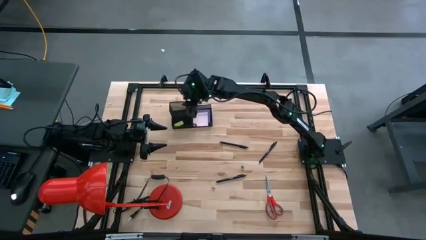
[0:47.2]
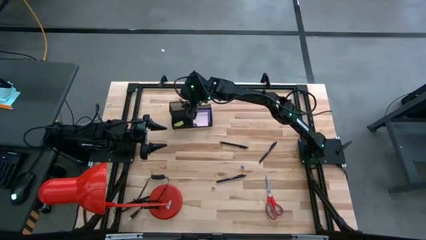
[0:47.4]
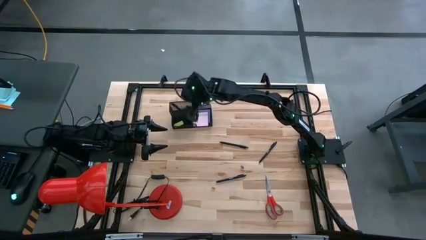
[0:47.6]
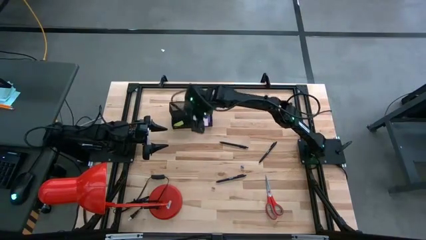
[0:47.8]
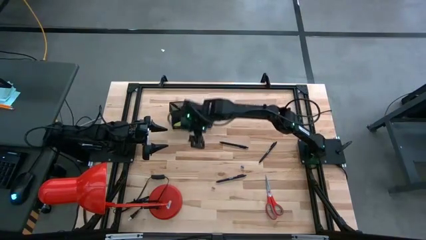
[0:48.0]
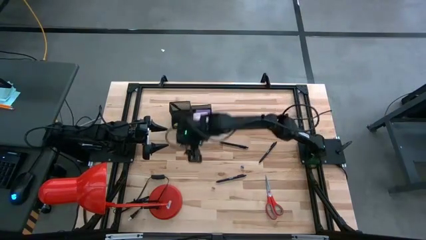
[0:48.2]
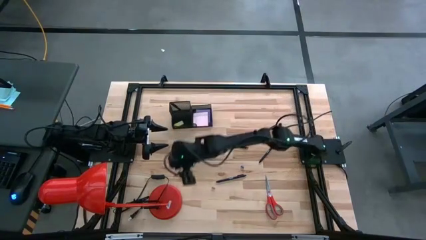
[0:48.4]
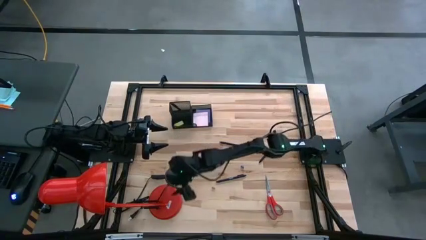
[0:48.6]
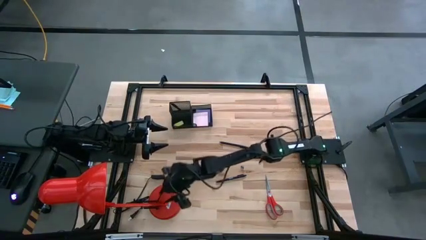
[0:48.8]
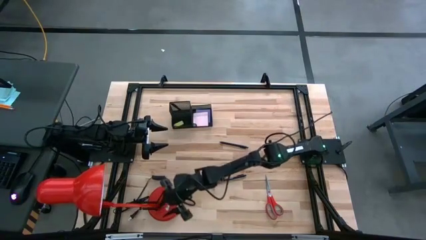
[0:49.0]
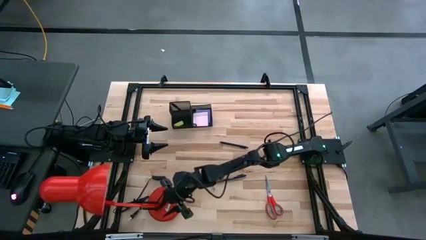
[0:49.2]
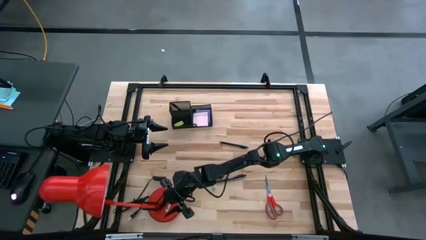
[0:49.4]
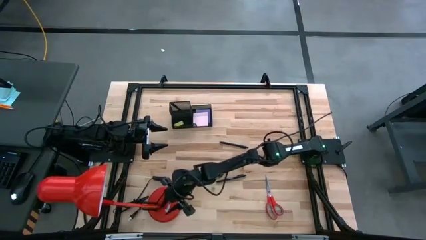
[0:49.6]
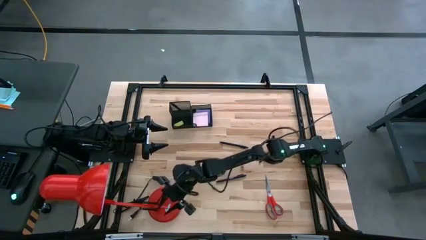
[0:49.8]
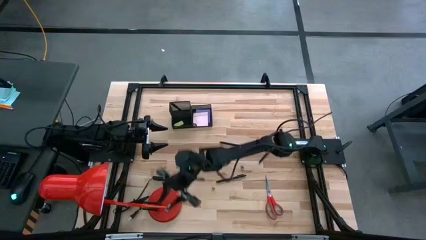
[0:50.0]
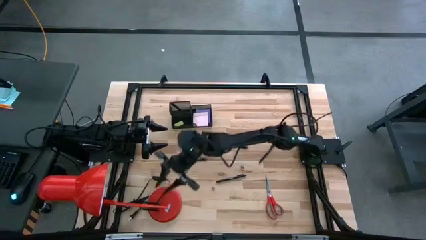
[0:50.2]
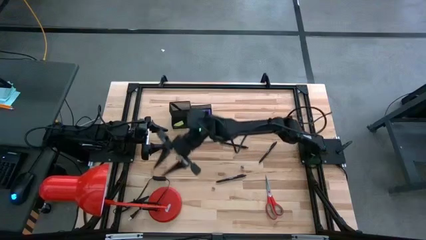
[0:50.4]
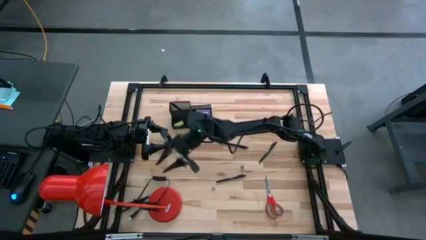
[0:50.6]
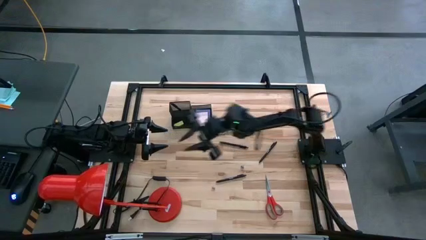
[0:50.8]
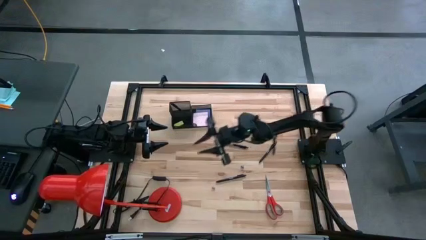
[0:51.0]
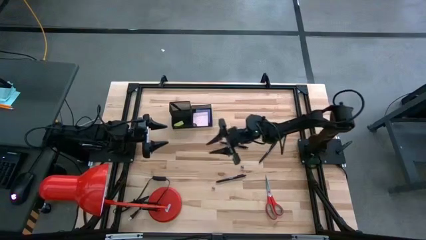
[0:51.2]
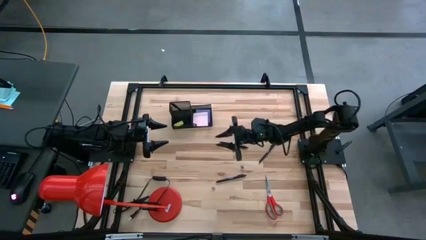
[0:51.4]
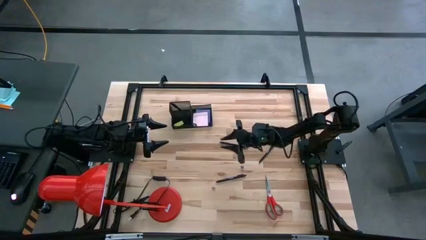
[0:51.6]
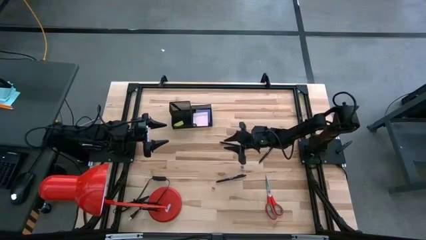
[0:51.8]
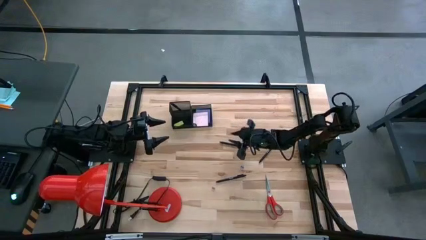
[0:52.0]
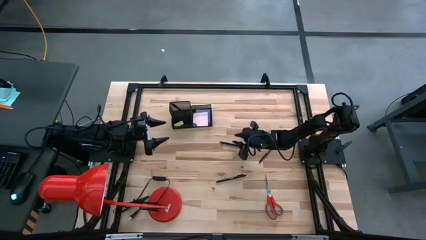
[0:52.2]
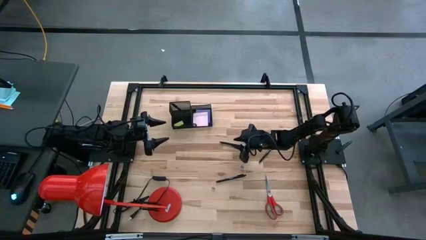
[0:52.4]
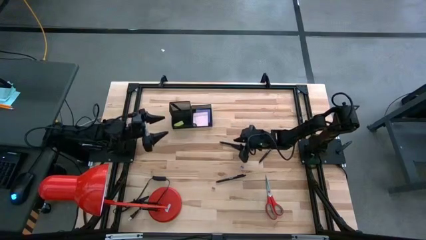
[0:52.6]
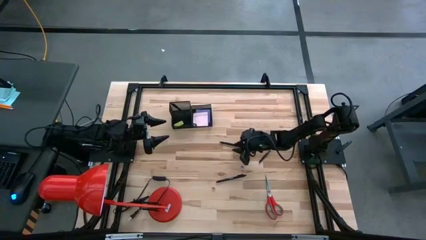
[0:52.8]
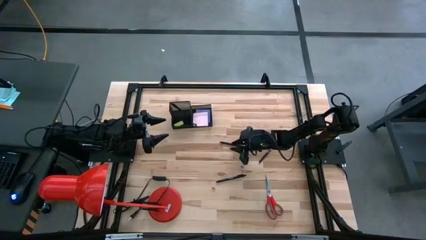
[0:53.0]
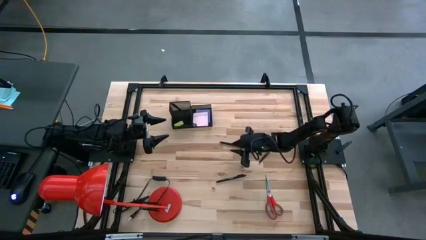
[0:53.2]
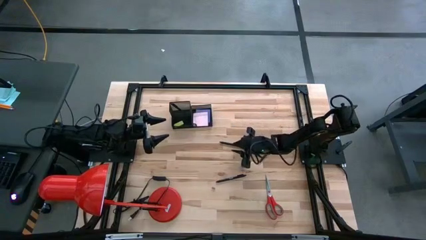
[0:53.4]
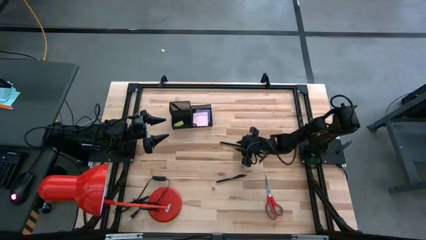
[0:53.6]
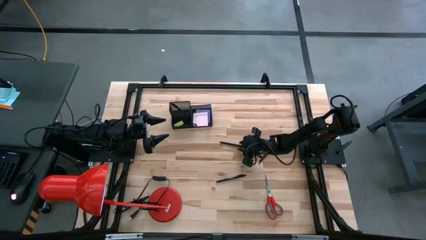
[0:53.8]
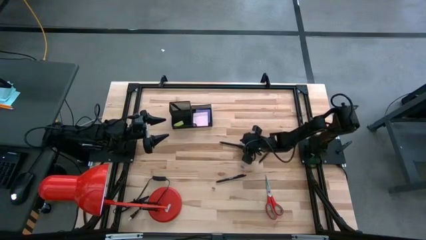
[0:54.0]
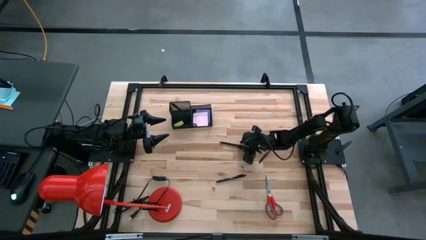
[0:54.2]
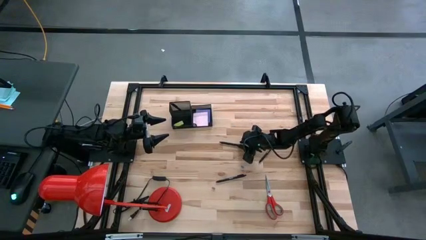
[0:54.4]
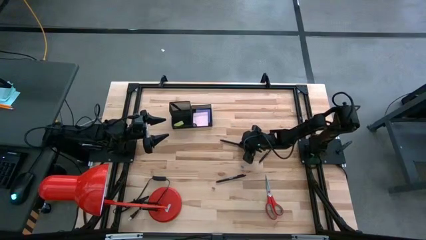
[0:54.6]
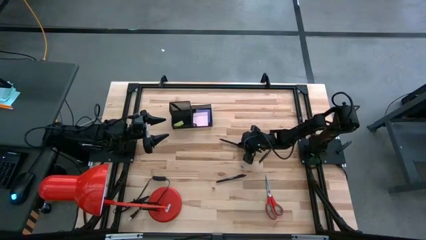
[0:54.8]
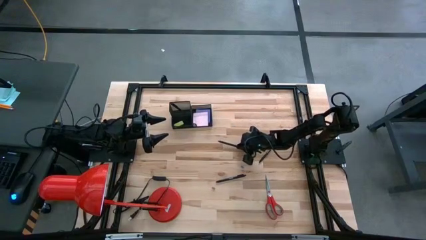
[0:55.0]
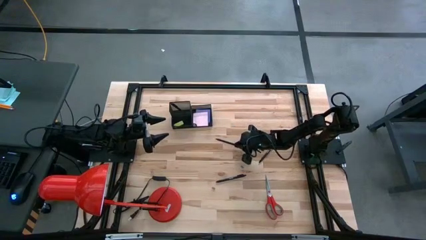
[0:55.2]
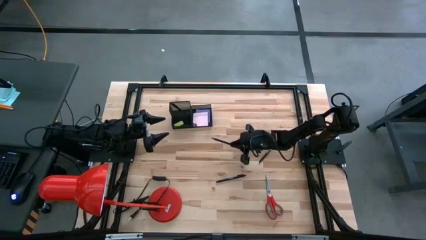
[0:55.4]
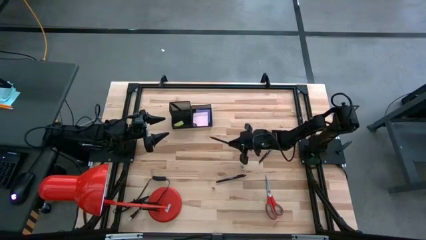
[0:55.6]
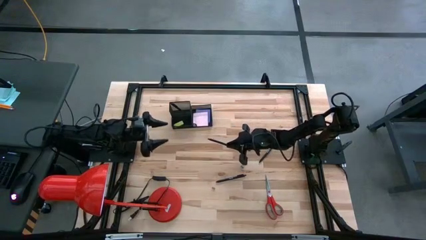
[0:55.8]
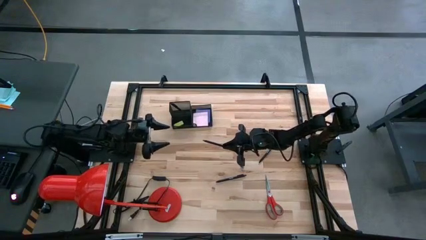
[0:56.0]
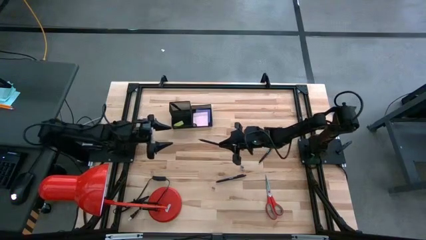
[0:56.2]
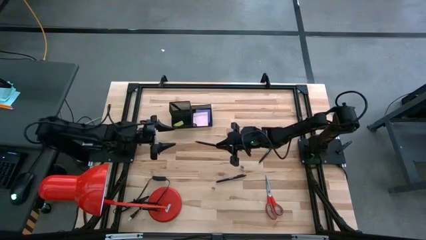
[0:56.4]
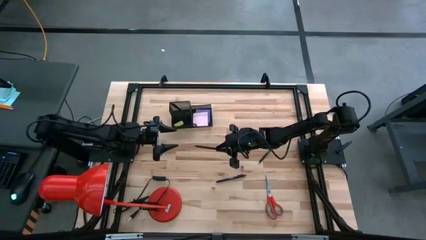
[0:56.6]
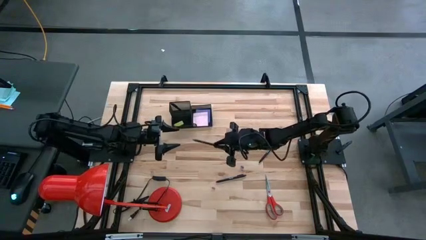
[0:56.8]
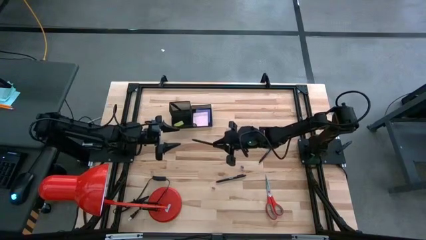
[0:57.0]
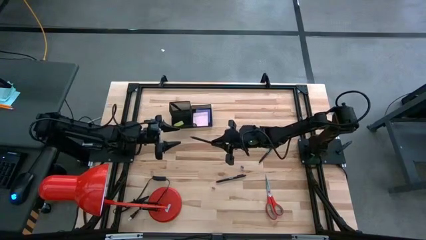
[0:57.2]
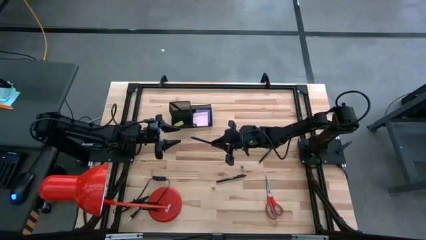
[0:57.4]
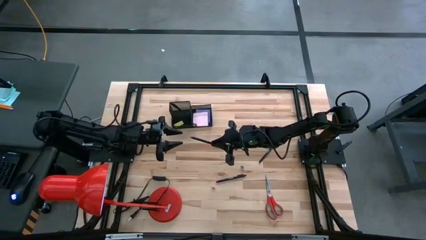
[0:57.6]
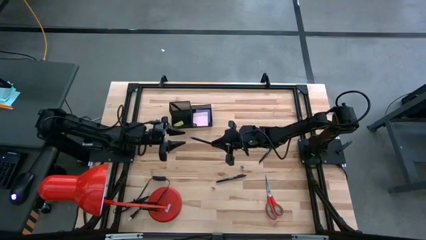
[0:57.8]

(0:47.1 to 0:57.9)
Task: Pick and place office supplies into organizer
Put the black pen into the desk organizer

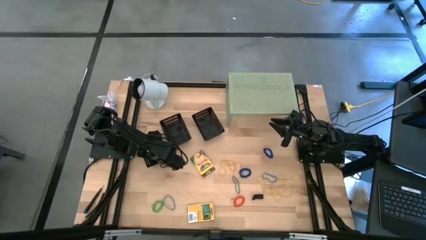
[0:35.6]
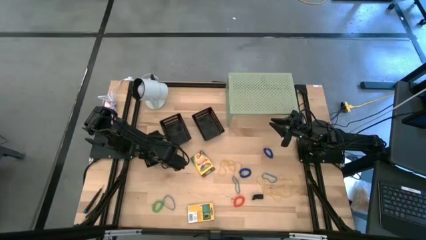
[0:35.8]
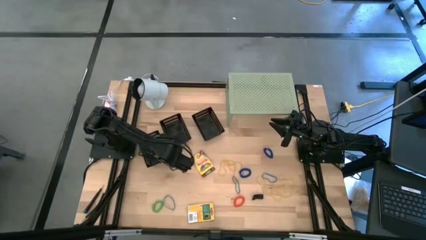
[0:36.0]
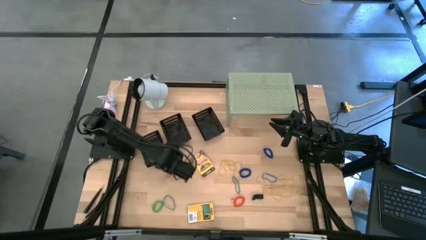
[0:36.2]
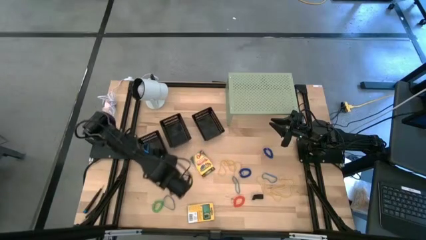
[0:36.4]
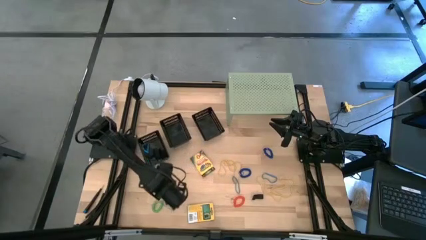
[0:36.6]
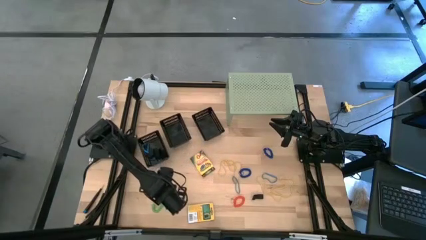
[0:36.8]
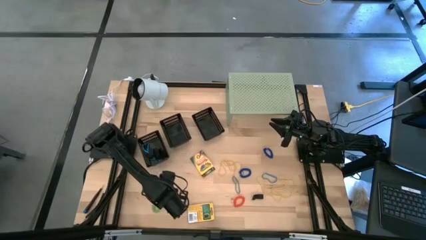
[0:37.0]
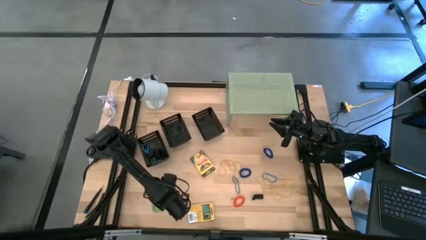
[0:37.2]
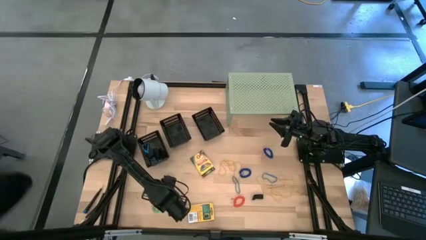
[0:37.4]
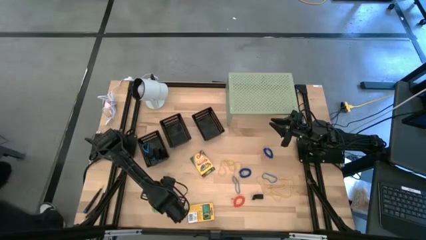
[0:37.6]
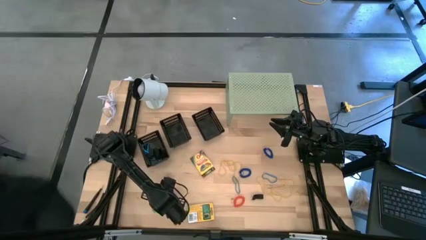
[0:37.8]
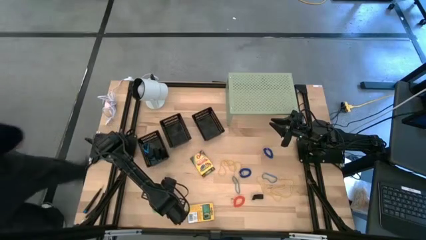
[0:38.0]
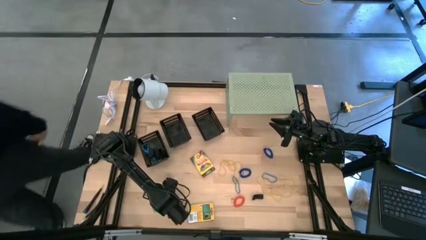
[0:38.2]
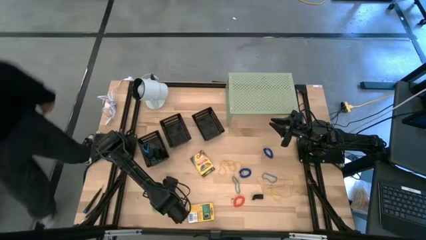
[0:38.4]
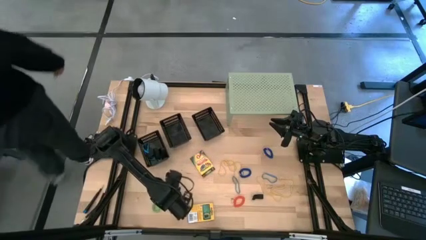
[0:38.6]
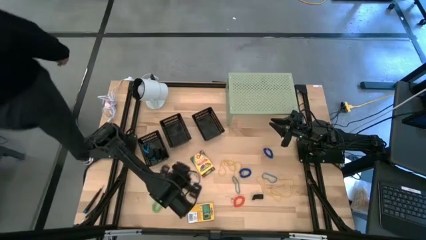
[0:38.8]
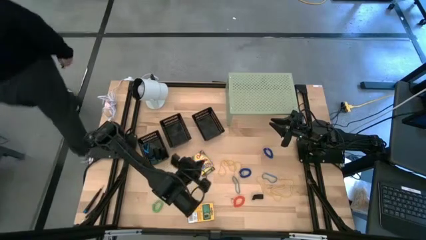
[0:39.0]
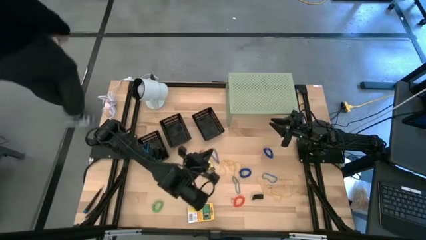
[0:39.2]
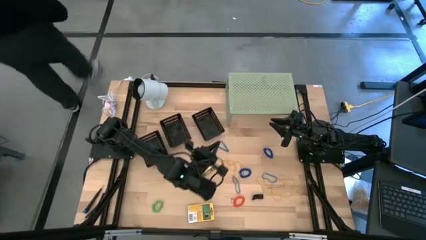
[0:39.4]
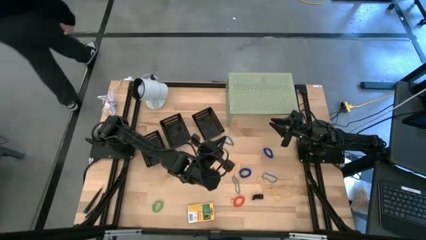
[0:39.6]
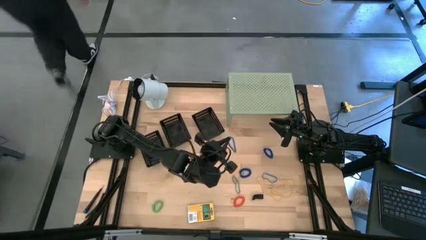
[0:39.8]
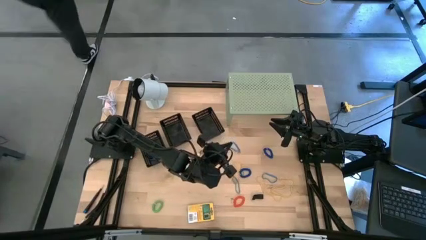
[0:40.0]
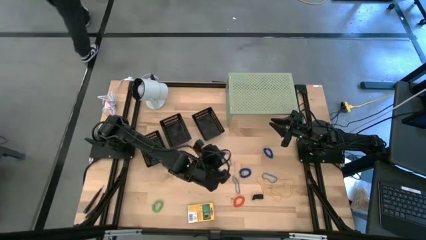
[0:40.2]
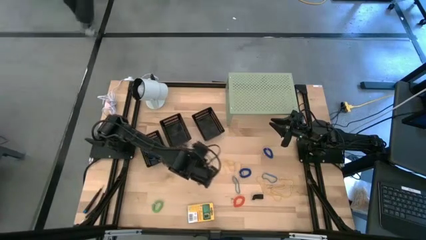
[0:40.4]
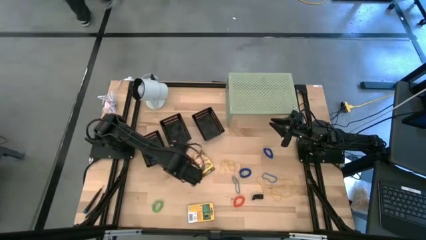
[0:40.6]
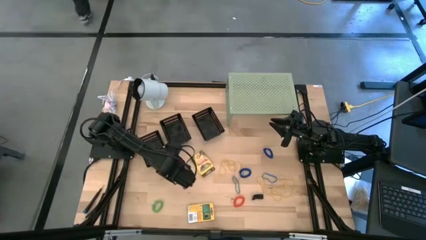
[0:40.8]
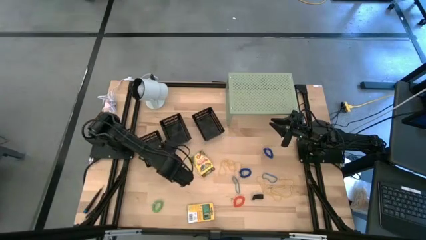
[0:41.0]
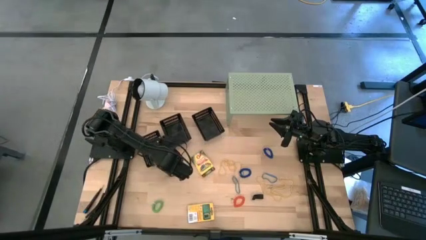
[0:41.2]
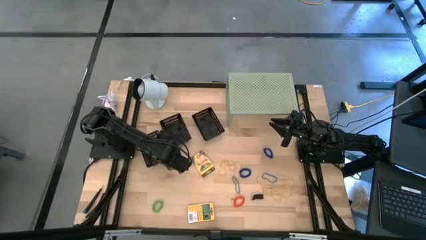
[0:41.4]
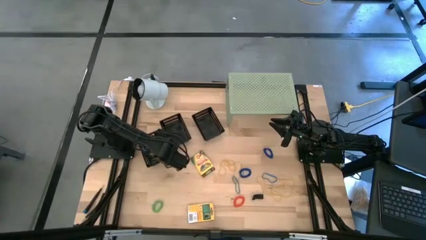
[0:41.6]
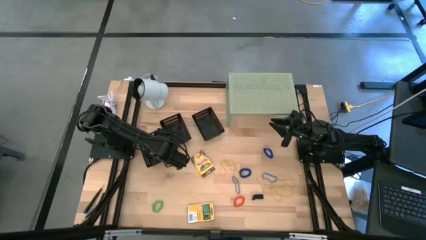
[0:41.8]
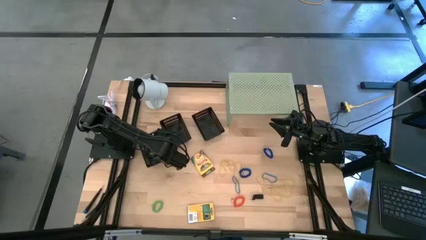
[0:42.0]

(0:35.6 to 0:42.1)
Task: Pick & Place Office Desk Supplies
Put the blue rubber band into the left black basket
